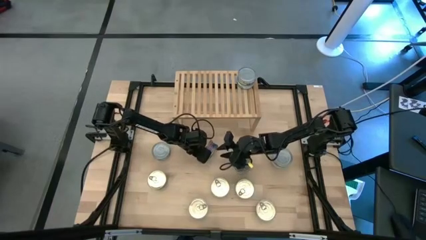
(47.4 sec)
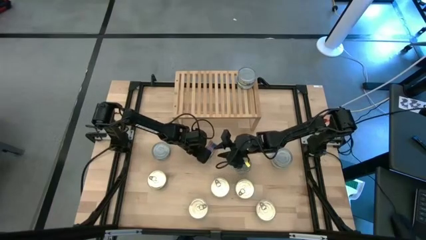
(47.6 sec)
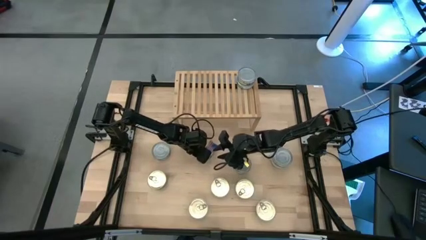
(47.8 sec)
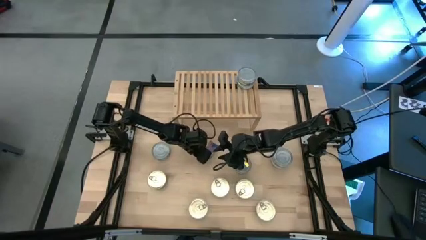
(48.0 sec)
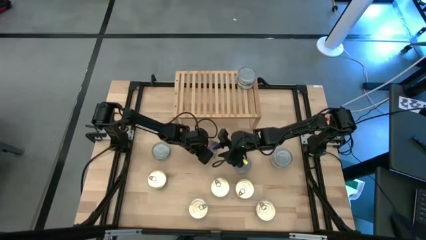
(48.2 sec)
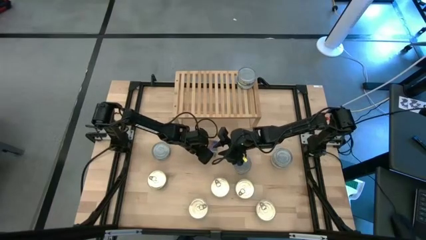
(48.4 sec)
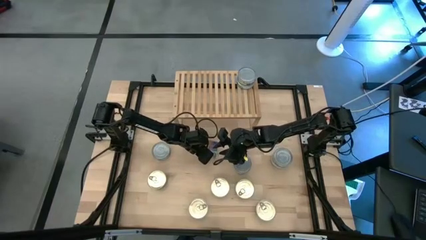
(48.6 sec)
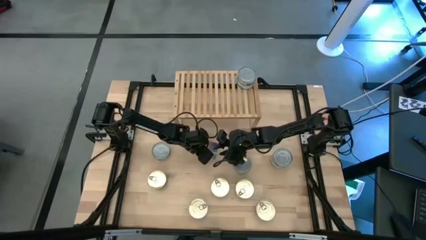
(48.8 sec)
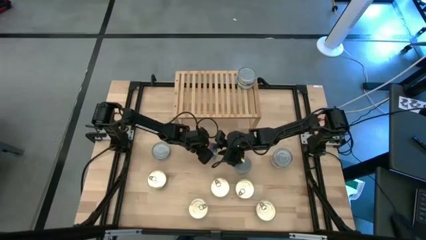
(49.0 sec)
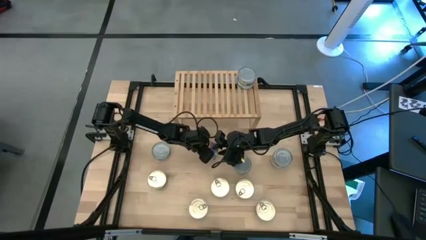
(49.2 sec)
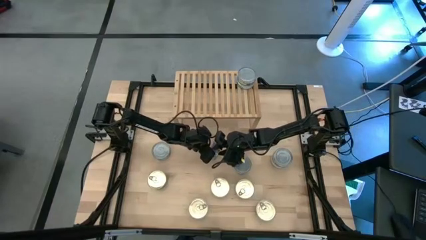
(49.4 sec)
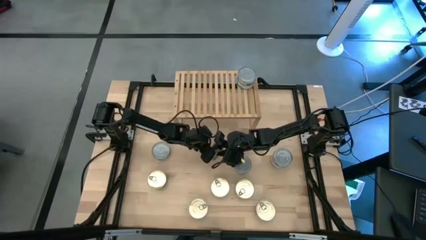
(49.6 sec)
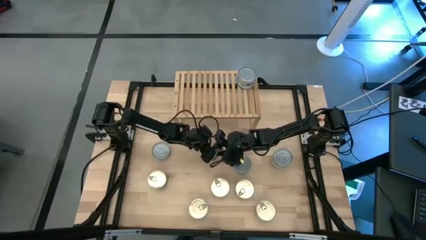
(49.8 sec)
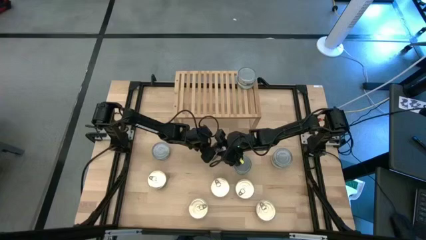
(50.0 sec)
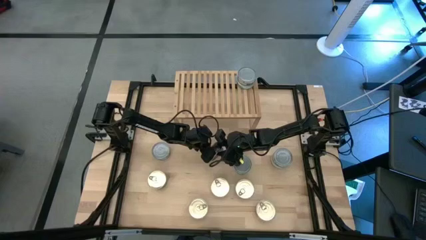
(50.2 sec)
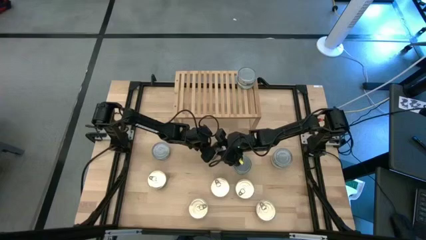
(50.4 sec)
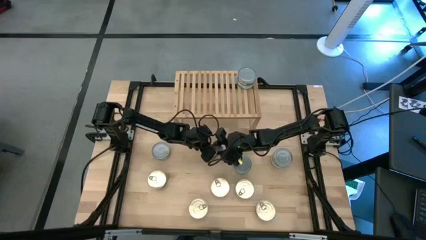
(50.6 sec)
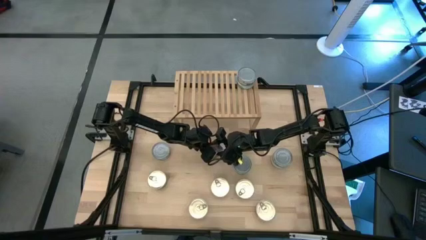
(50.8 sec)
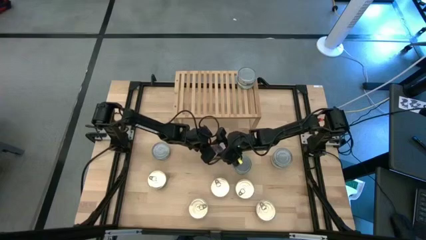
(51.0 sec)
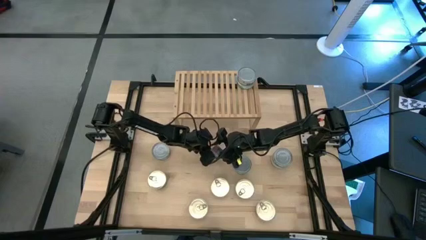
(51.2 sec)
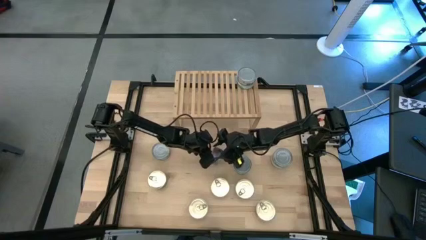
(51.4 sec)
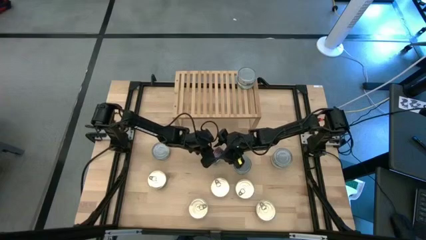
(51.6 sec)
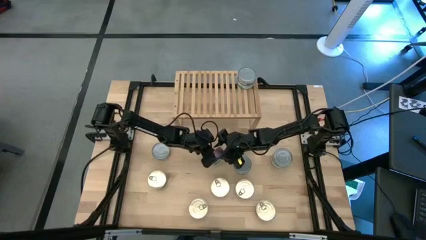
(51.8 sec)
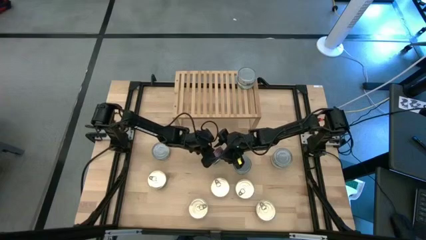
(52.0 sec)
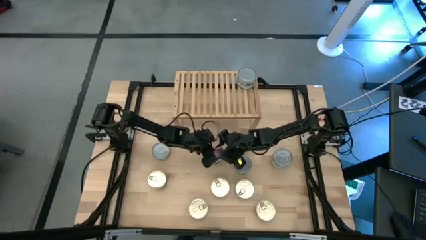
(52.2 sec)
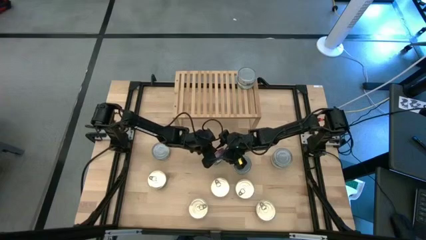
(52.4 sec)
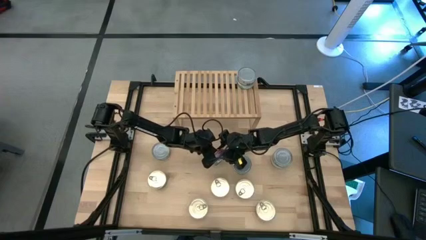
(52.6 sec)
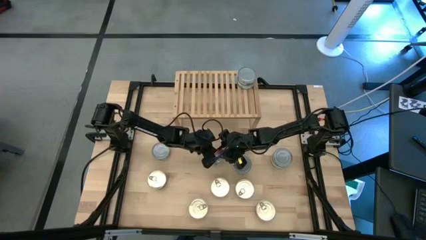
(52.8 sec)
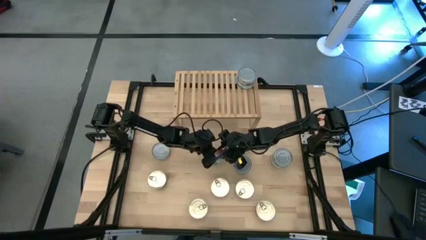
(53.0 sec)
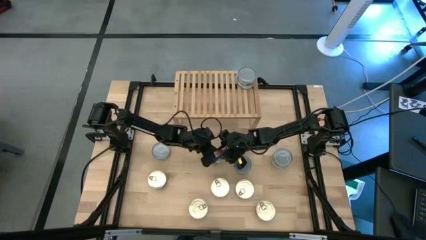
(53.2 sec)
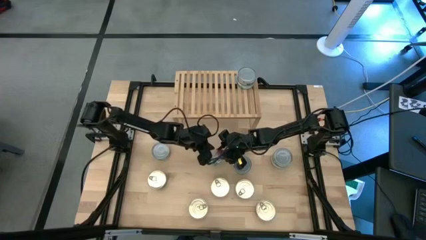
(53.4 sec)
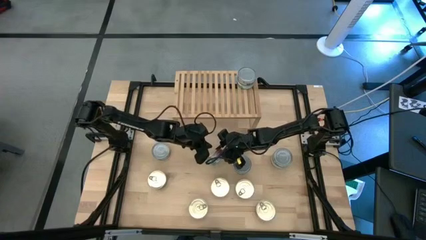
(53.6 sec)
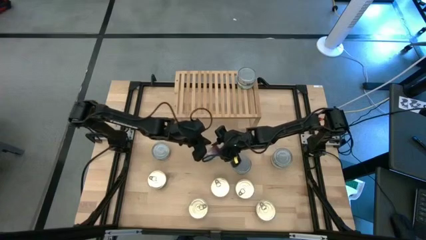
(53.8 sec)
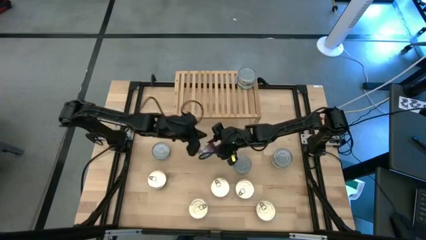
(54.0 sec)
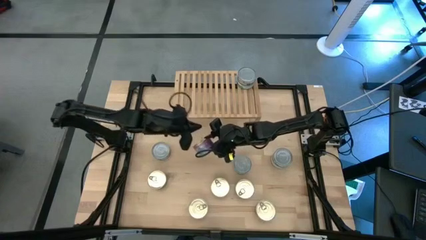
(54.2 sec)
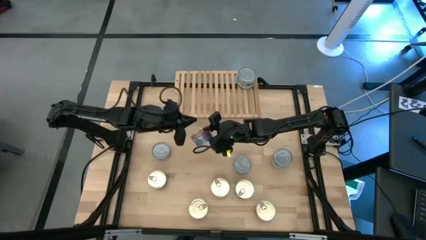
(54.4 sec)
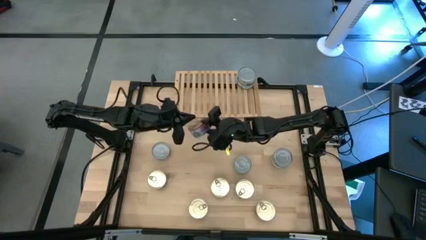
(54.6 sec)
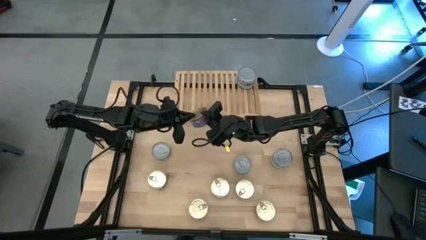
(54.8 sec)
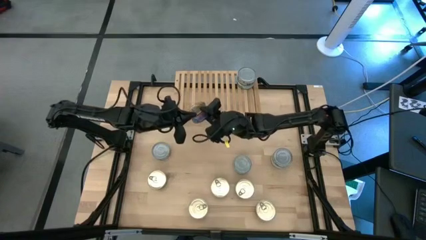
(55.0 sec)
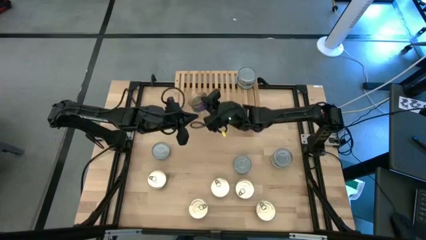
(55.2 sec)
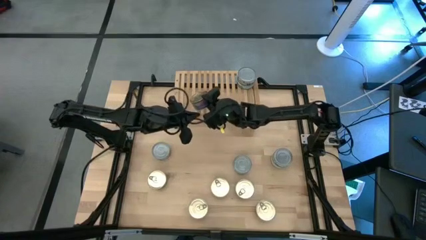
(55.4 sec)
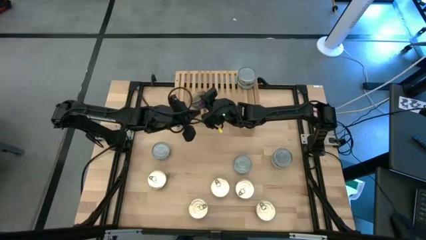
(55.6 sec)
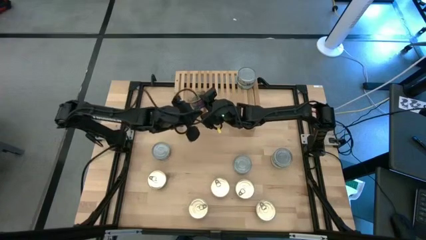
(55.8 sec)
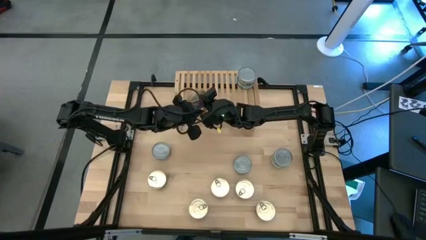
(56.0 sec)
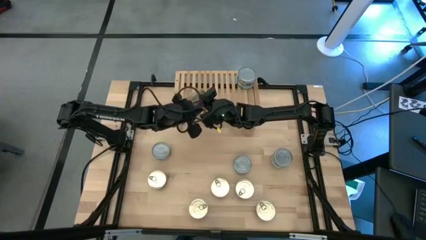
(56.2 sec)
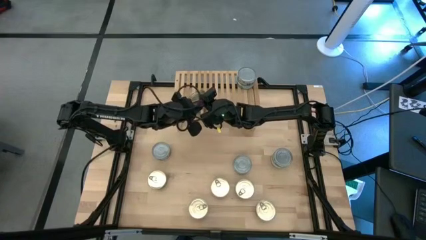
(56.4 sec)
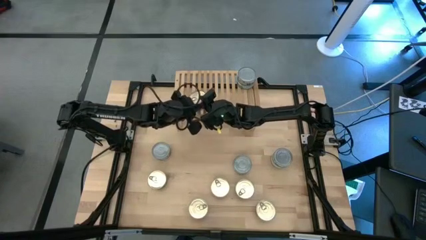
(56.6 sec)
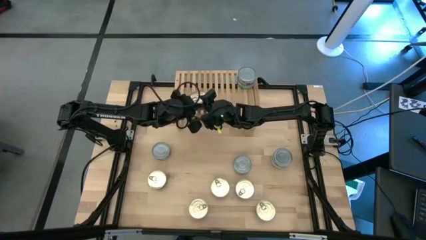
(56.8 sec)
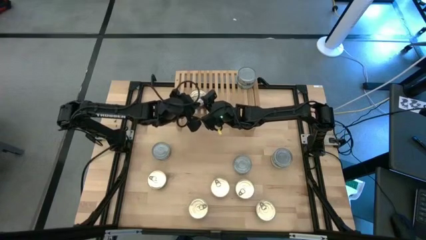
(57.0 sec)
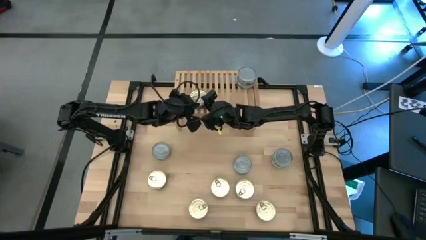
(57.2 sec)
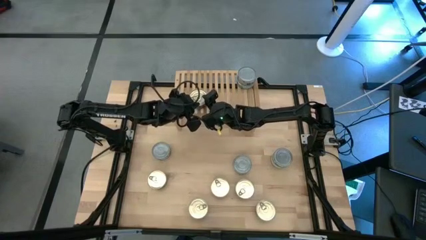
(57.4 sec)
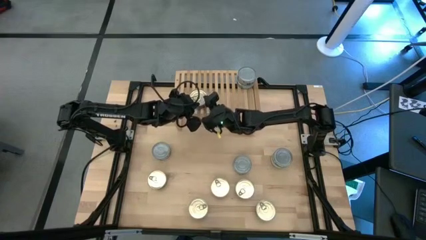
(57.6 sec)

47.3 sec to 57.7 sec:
Task: Stack canned seafood by type on shelf
Put the blue tuna can on the shelf
